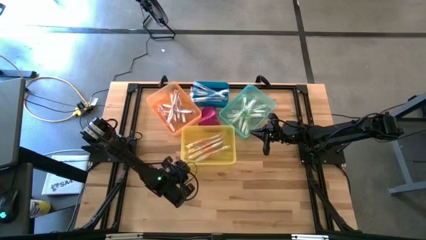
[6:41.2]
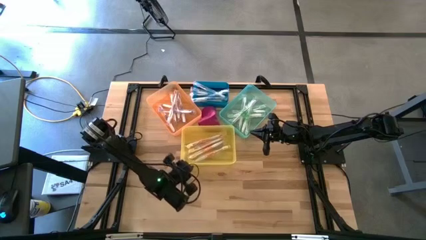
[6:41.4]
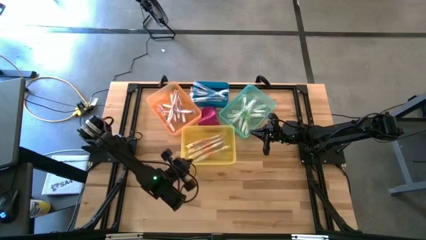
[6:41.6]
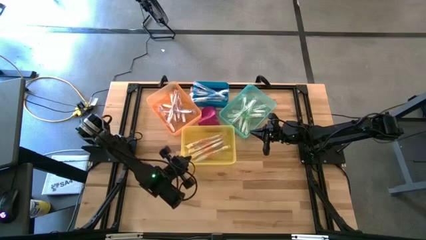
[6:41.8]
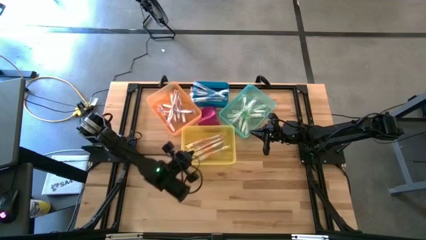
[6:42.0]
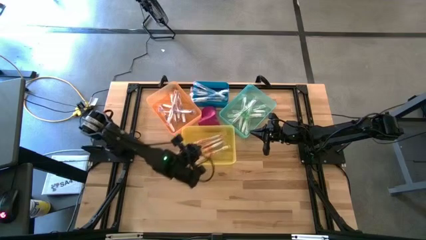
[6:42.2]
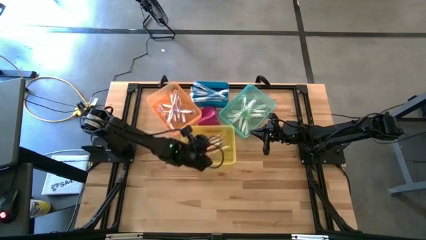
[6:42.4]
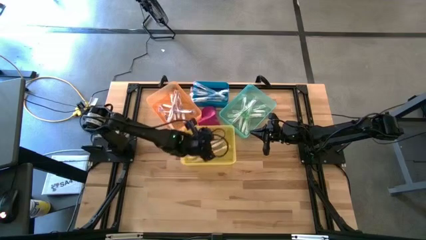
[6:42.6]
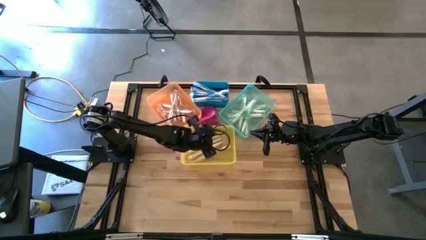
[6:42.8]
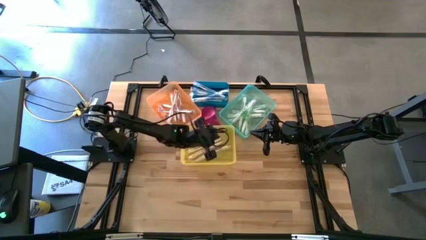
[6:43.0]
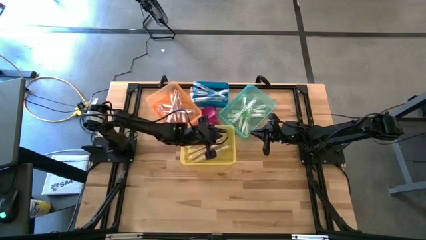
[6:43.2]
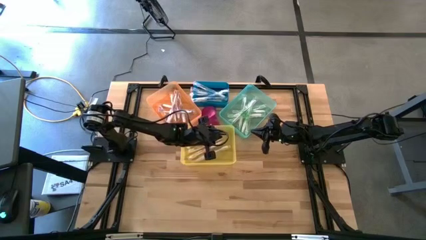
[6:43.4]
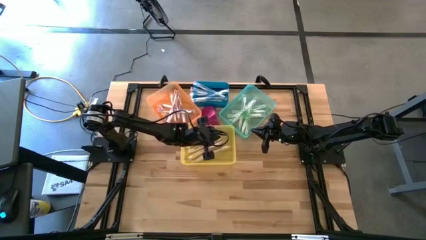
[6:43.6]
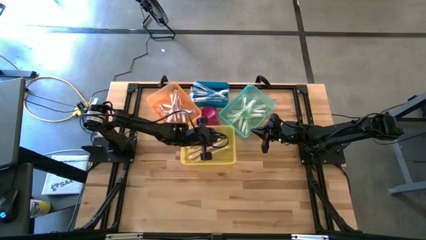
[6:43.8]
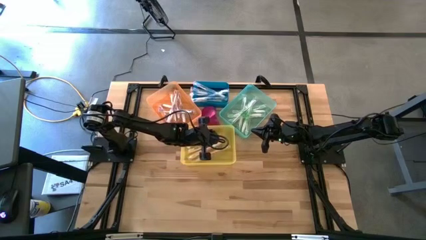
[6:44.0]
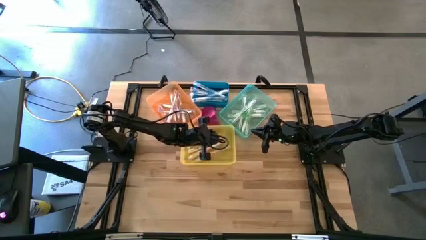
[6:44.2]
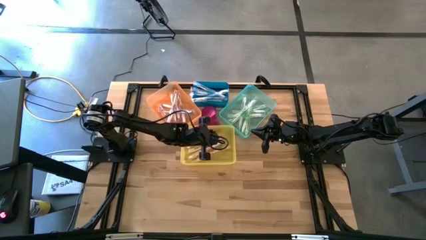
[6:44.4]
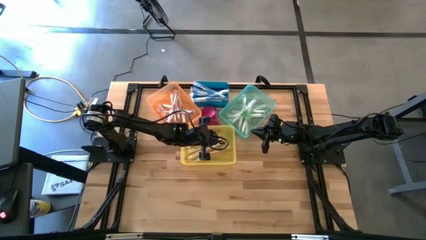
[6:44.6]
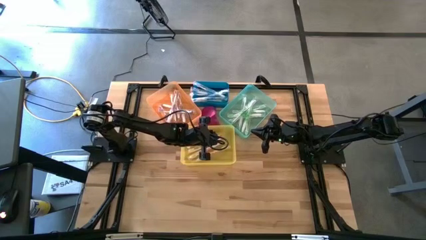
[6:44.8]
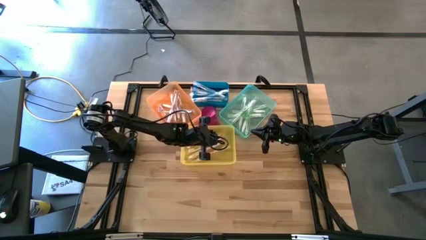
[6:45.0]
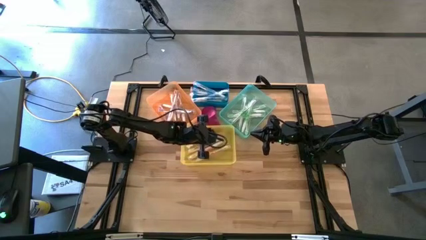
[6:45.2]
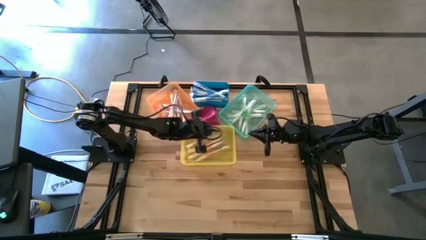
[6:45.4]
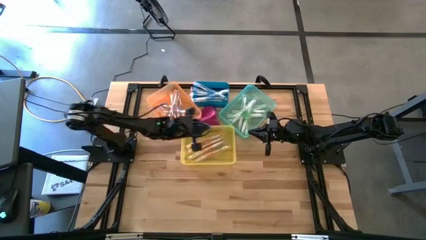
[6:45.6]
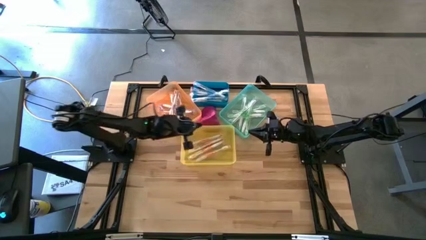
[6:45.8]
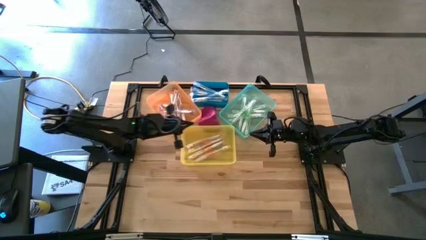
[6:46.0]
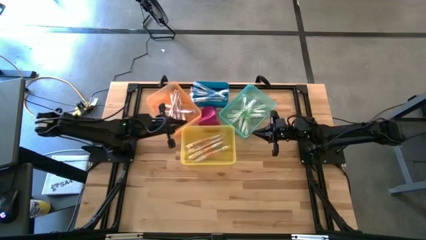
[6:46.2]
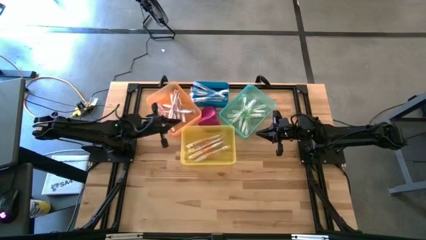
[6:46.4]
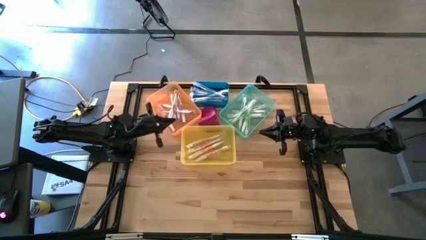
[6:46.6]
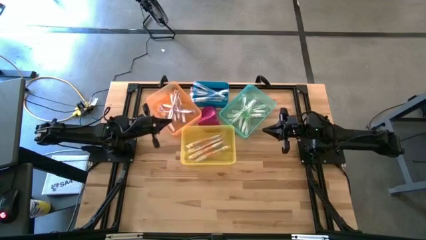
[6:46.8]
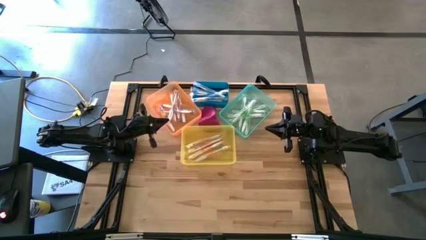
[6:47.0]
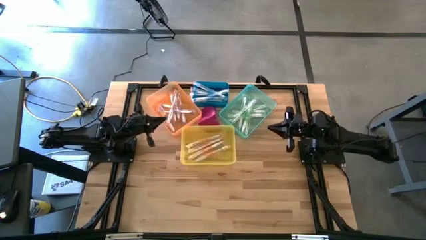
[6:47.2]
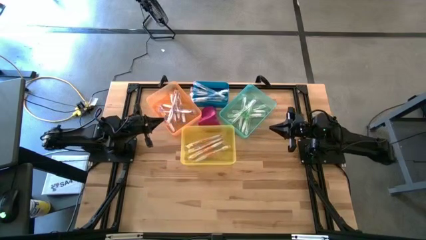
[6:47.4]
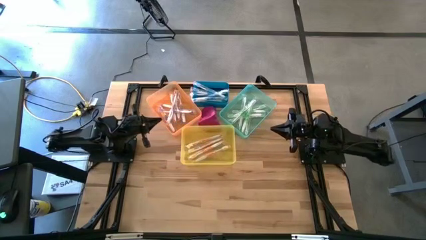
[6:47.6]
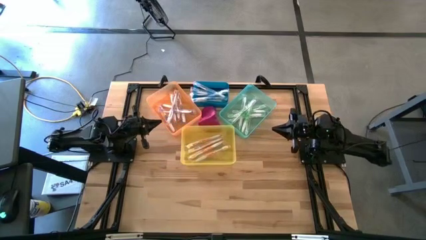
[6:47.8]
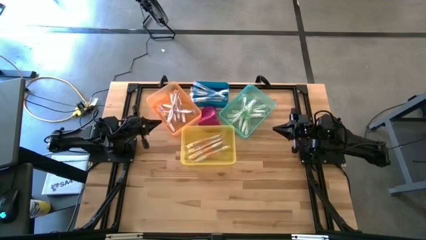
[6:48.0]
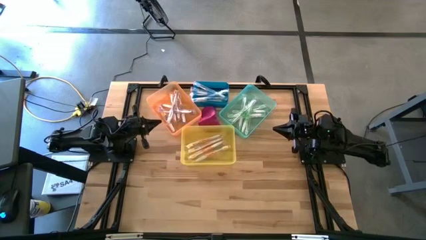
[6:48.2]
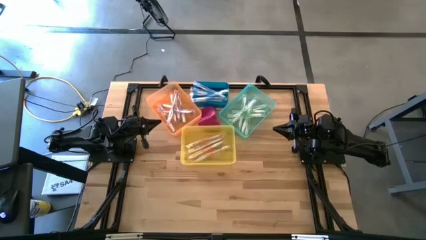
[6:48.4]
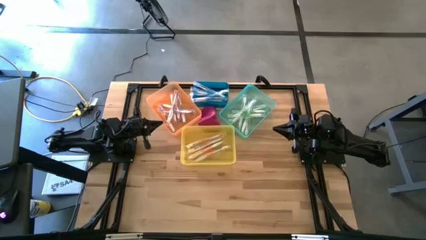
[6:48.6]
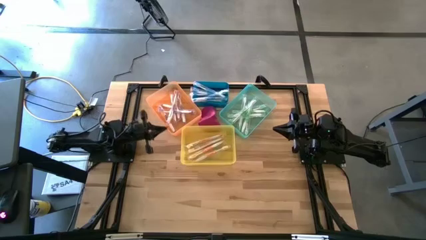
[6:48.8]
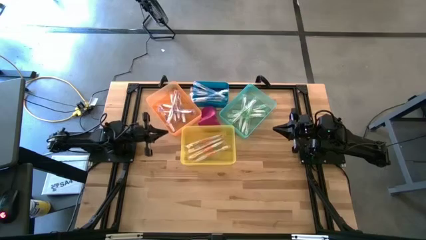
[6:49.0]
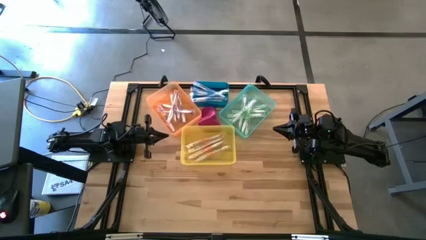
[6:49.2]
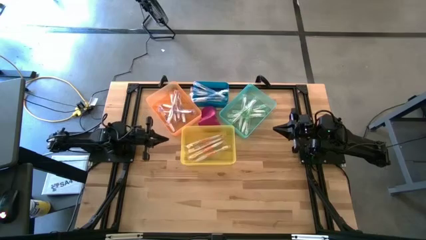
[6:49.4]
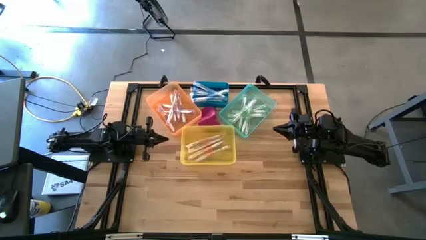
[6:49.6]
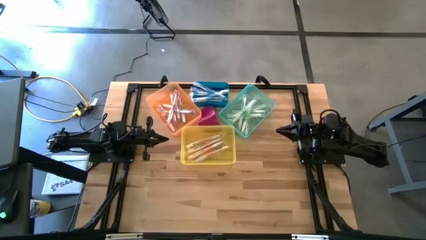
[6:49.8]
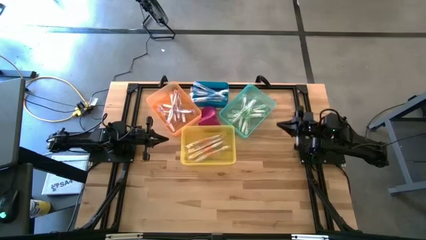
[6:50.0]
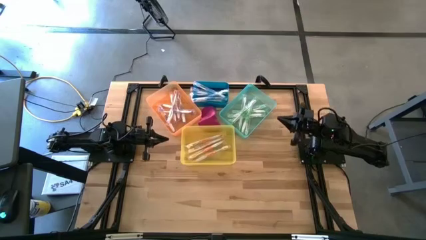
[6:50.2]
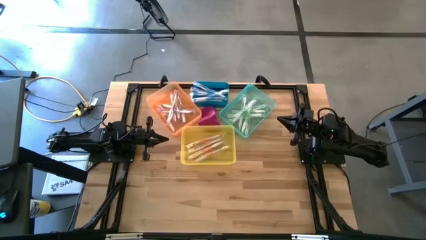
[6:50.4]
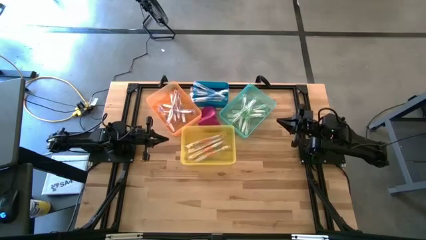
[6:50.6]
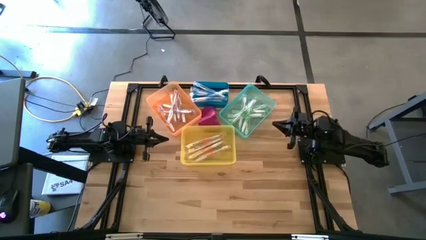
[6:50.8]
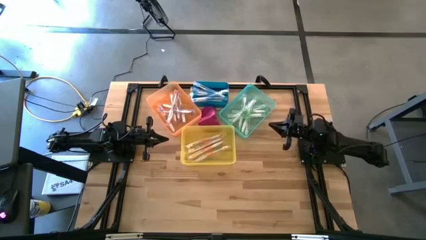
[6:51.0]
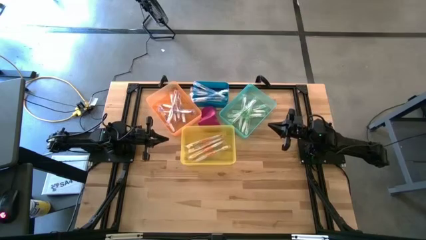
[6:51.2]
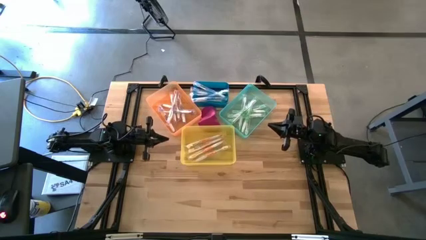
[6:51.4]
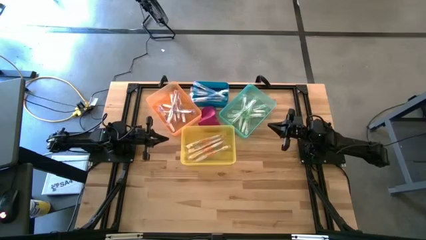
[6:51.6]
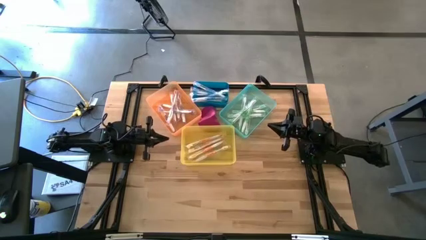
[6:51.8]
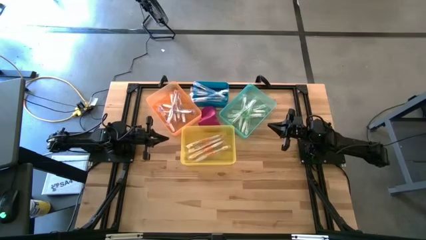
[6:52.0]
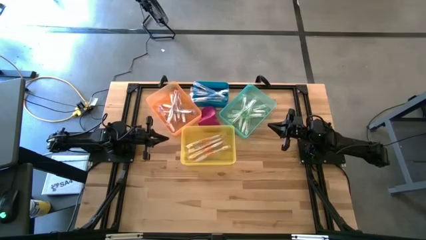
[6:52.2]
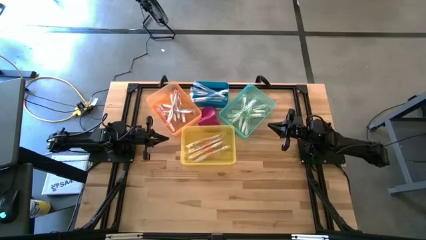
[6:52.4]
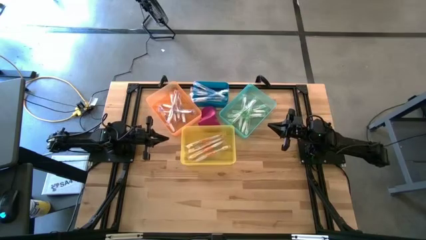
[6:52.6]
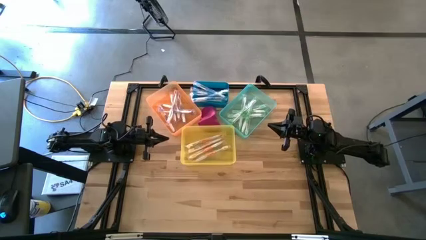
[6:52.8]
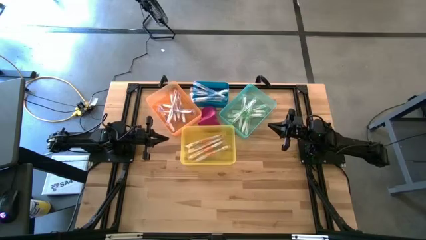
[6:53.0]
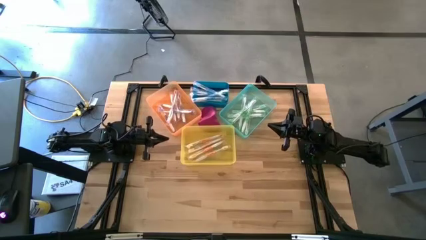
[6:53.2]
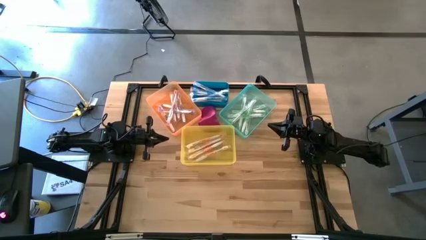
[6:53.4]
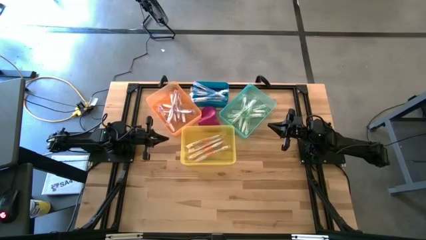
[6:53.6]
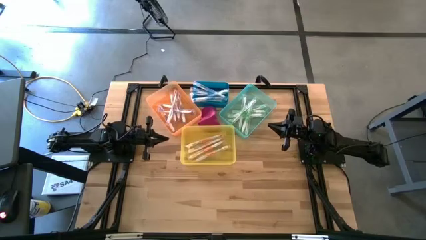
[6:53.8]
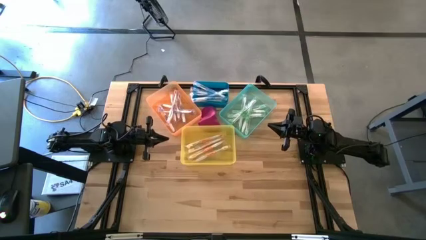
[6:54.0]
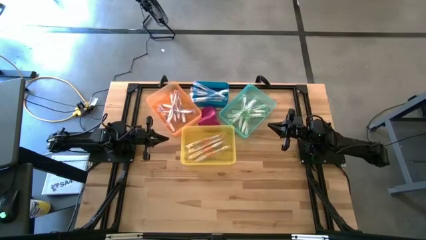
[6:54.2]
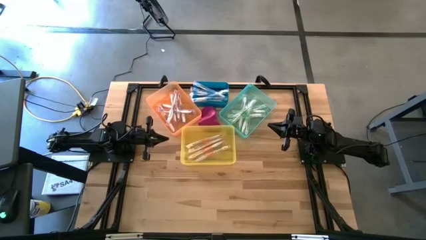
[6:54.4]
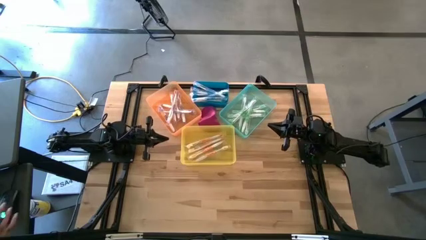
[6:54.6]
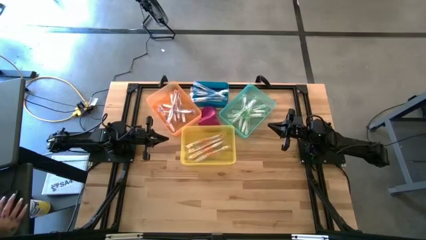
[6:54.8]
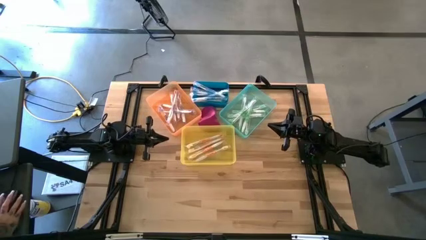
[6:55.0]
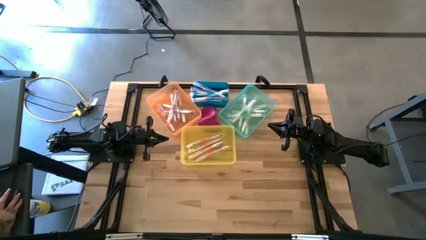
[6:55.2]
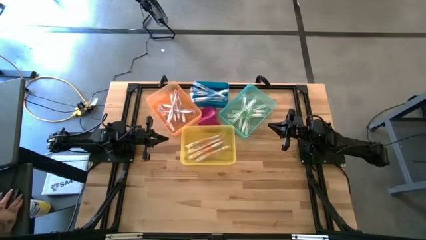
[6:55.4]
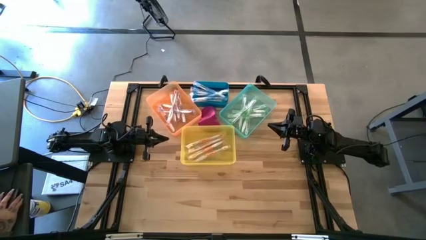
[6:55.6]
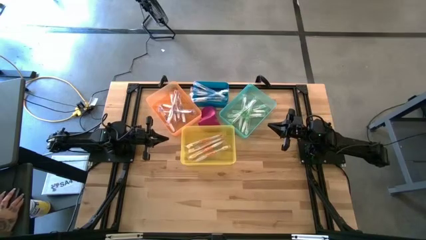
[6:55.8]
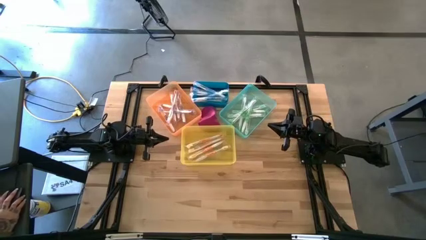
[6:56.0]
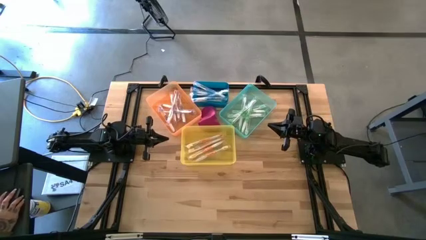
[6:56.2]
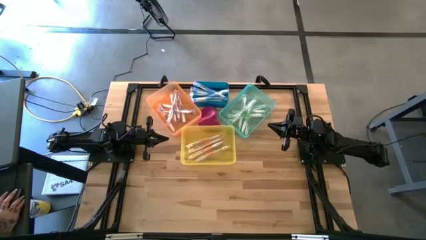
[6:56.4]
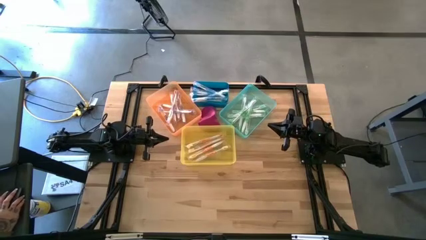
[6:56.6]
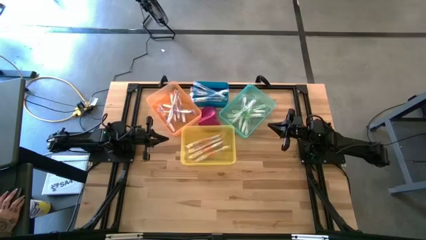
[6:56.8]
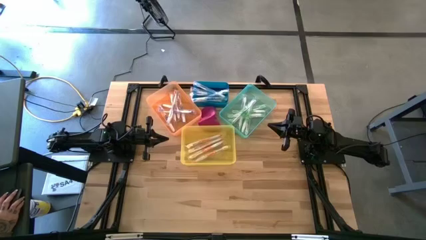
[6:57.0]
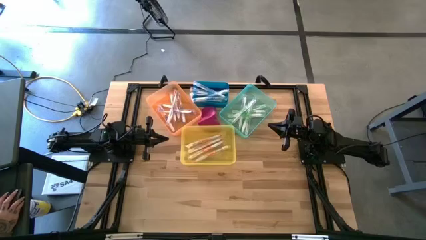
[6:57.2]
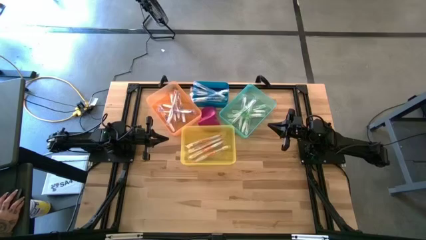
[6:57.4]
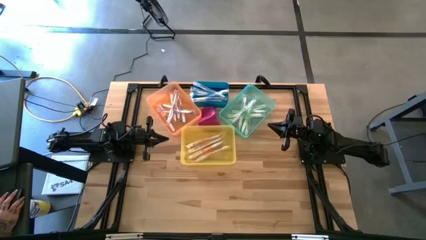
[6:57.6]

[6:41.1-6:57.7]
Task: Pick & Place Toothbrushes
Return to Home Position
